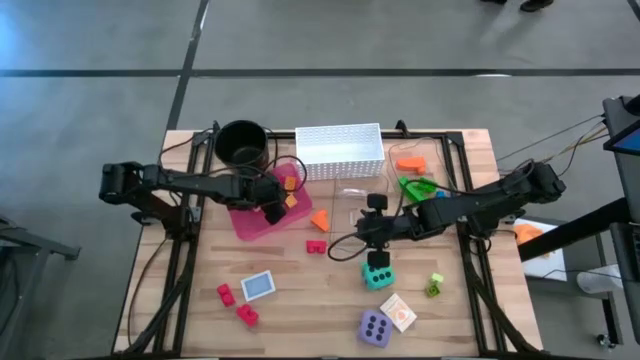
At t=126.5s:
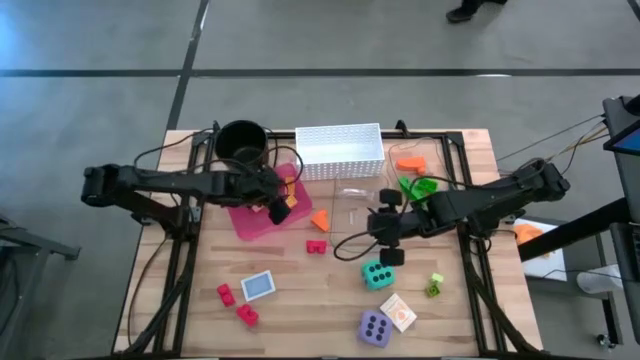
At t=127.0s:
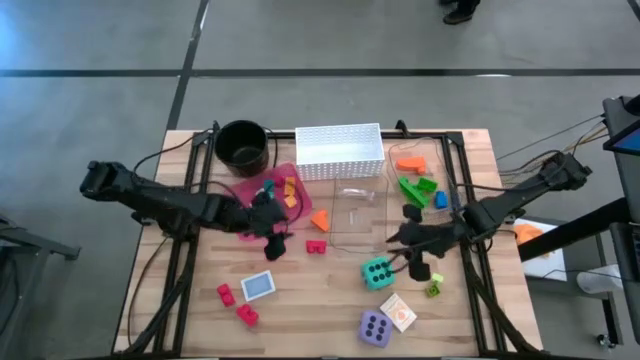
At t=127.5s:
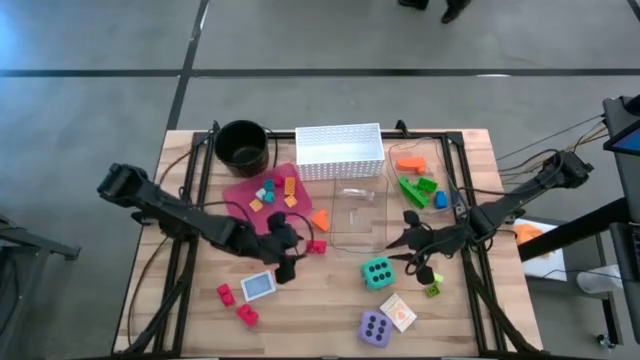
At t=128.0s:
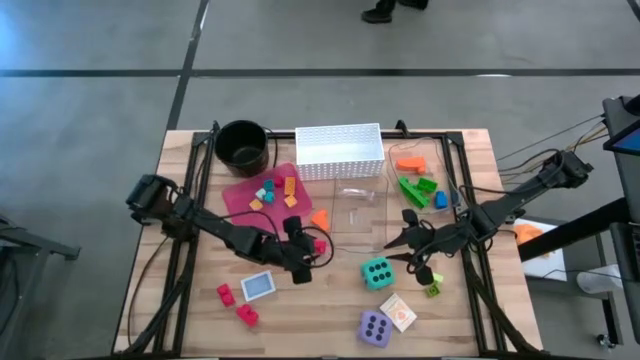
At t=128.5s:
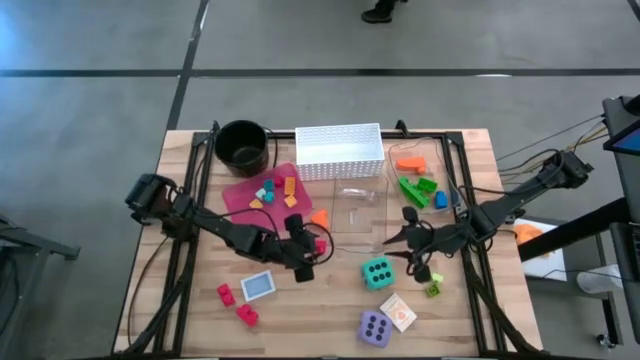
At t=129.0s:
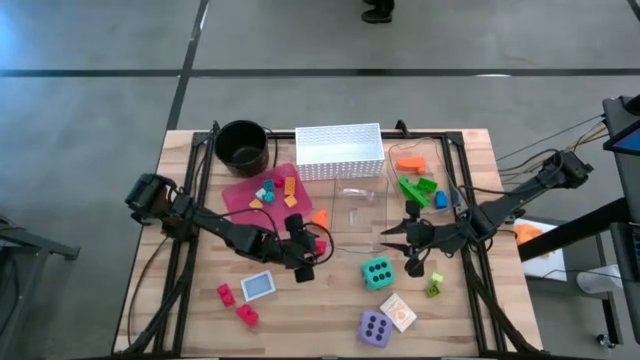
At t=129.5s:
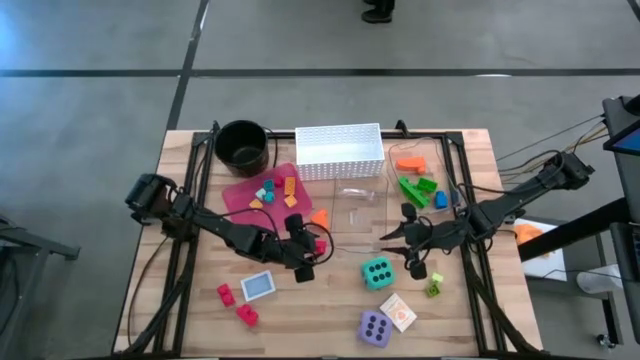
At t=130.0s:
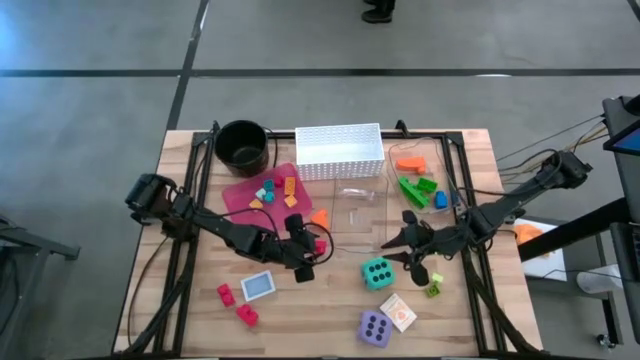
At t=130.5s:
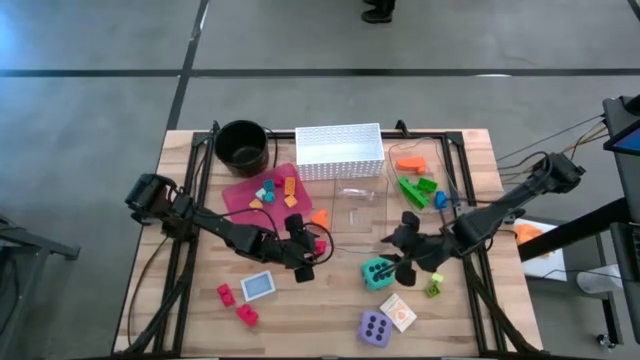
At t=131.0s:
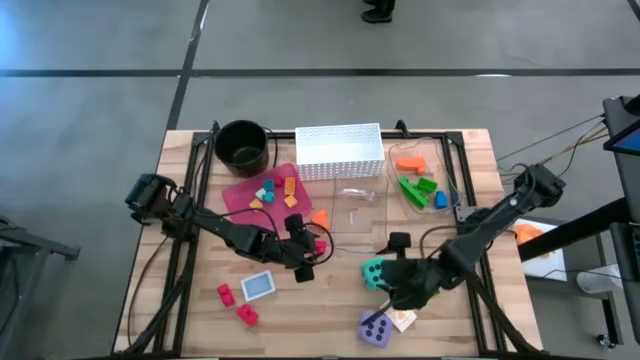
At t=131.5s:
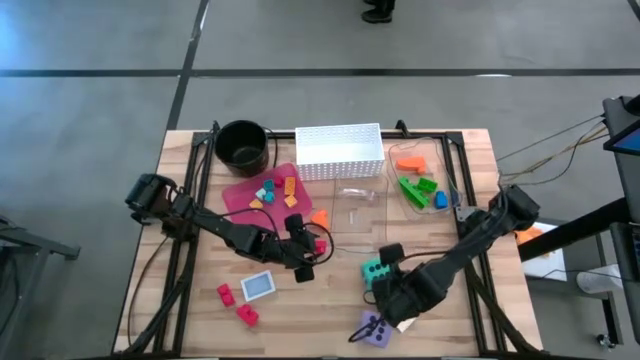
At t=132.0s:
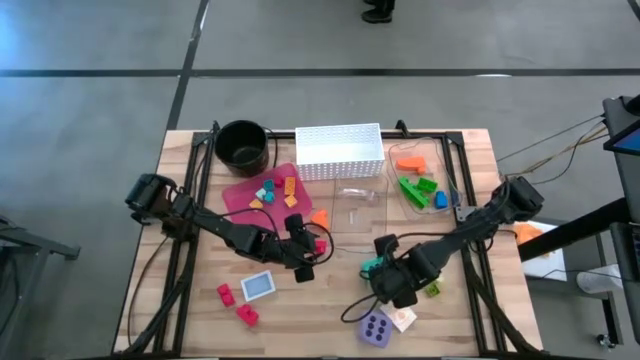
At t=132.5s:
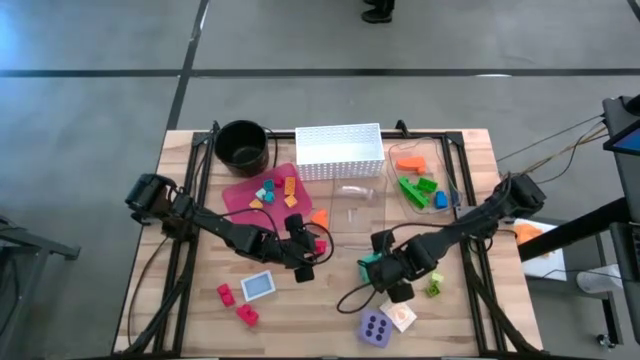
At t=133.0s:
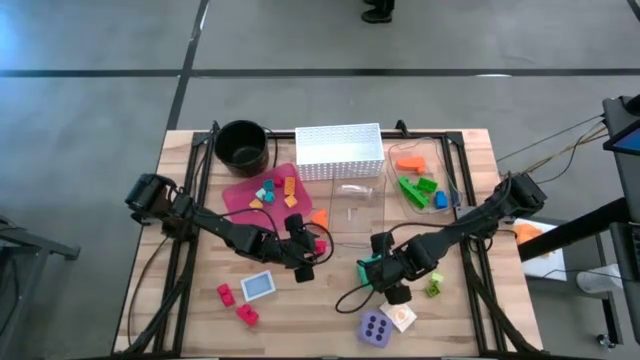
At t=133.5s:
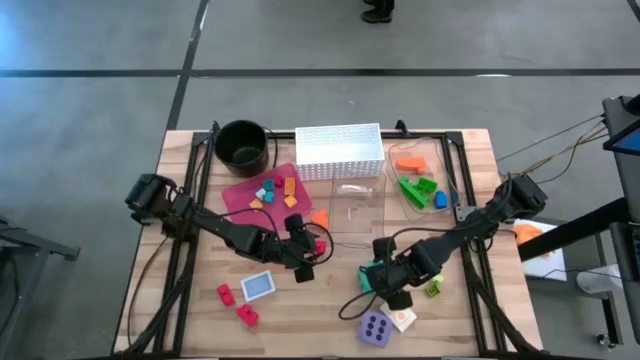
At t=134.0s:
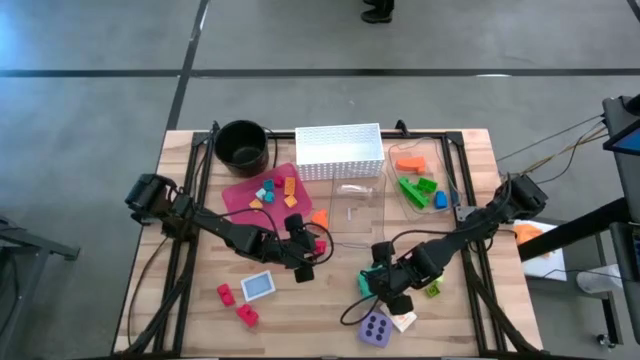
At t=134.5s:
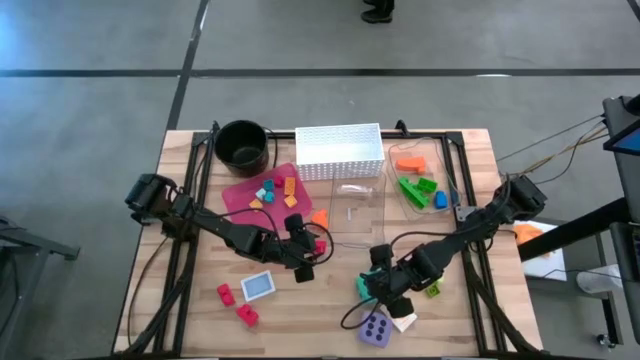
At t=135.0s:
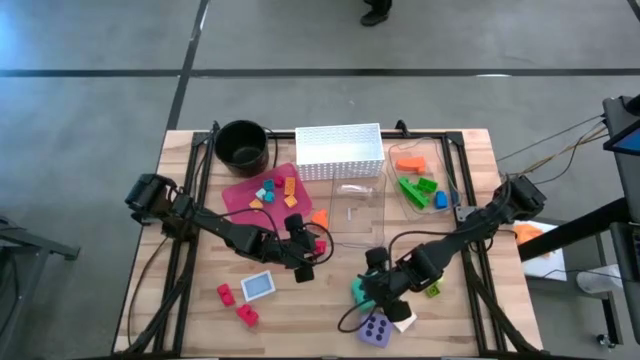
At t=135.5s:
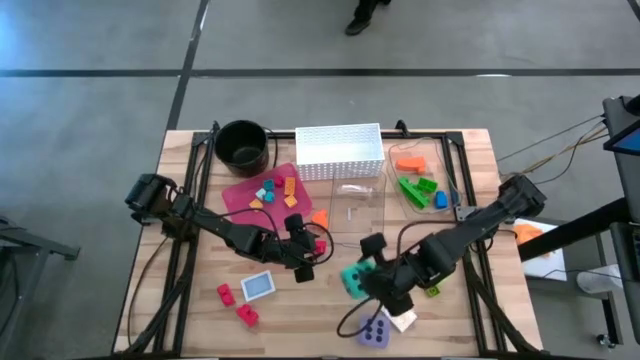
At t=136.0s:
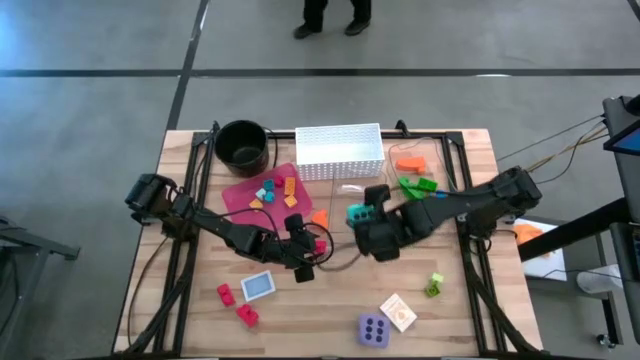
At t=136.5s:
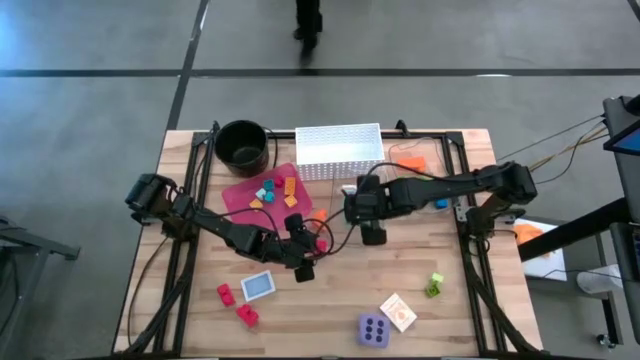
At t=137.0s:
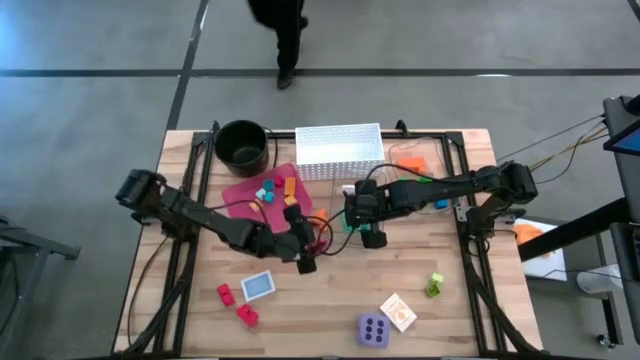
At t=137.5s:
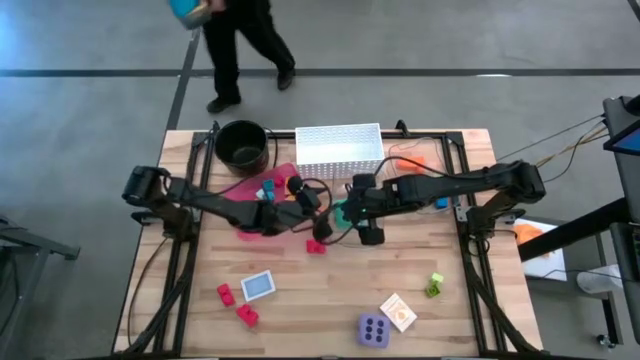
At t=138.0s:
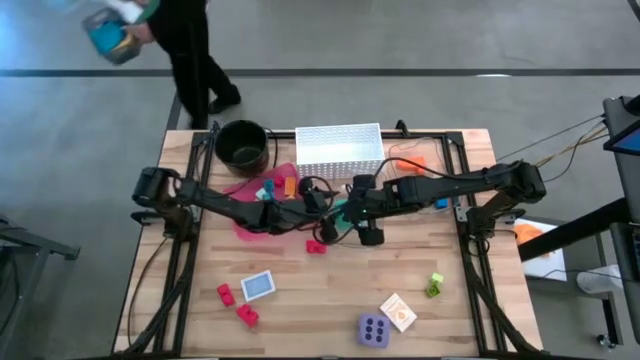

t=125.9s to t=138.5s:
Task: Pick & Place Toys
Put the blue die into the bottom transparent bin

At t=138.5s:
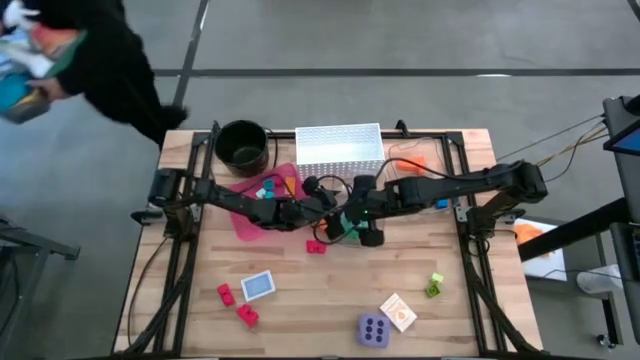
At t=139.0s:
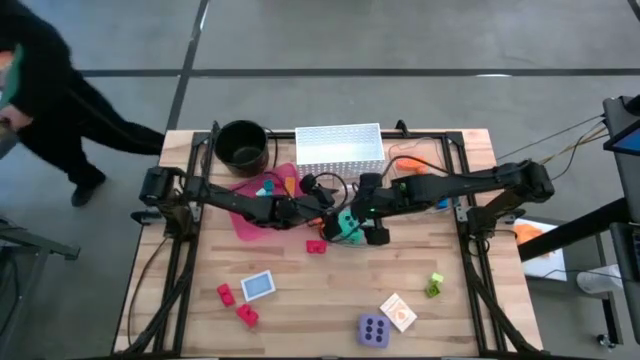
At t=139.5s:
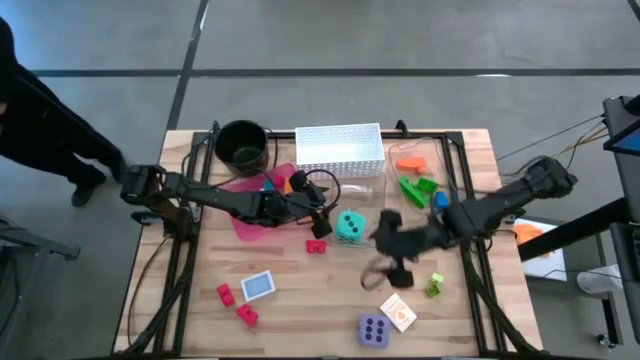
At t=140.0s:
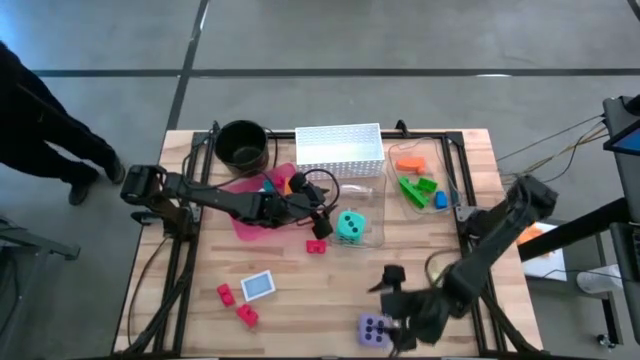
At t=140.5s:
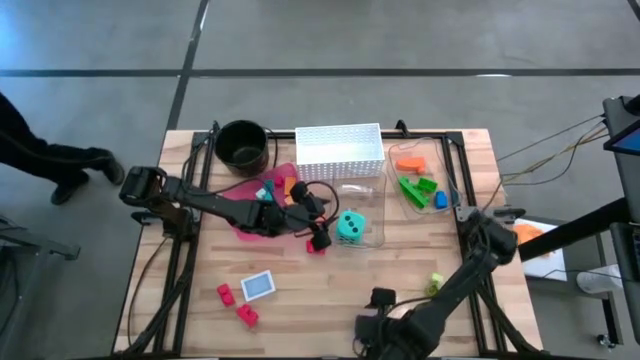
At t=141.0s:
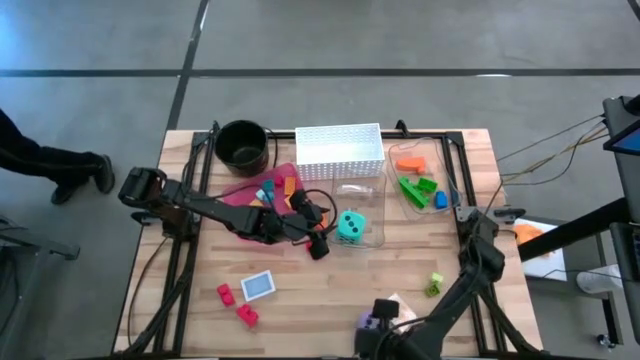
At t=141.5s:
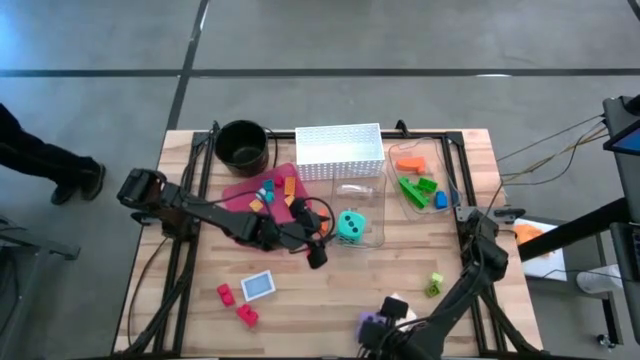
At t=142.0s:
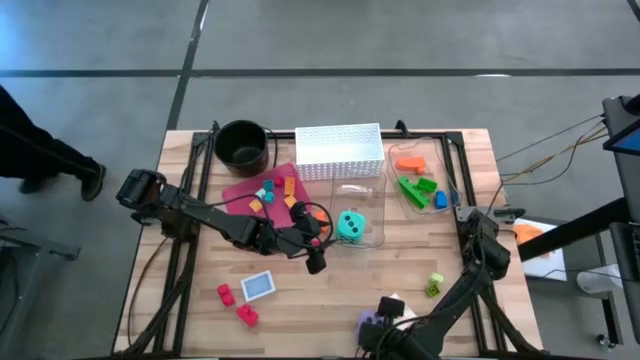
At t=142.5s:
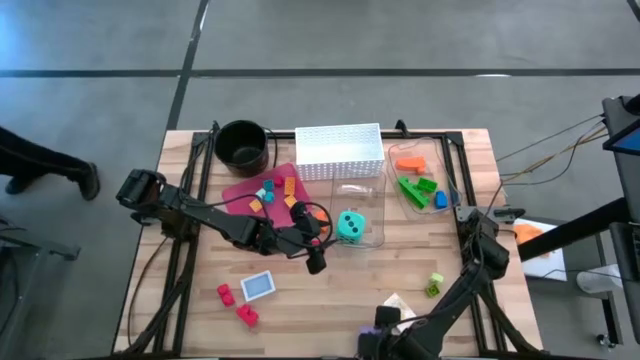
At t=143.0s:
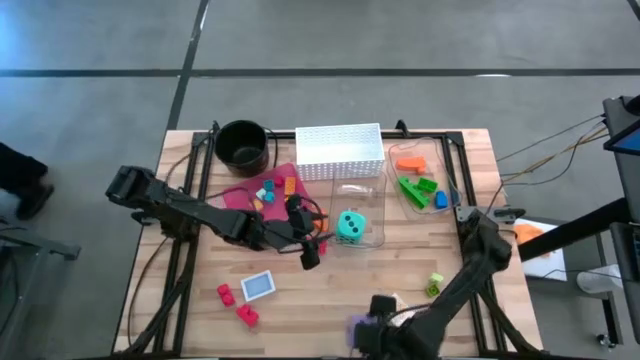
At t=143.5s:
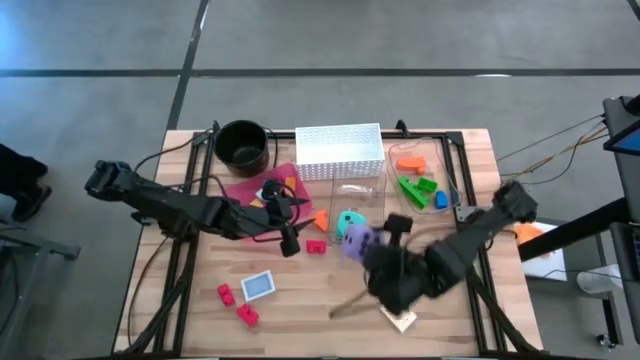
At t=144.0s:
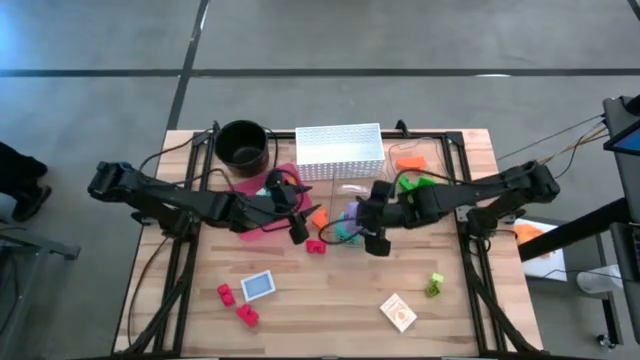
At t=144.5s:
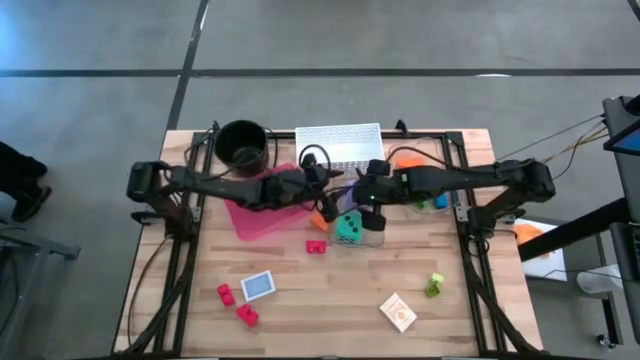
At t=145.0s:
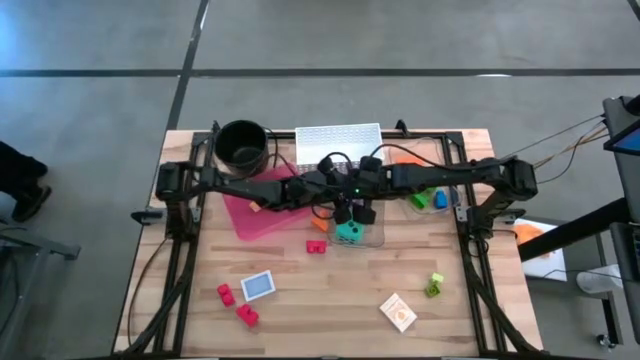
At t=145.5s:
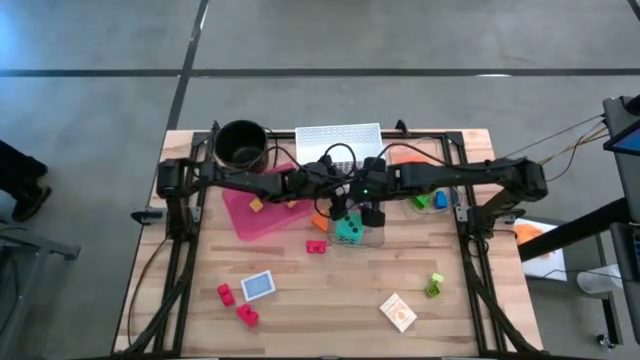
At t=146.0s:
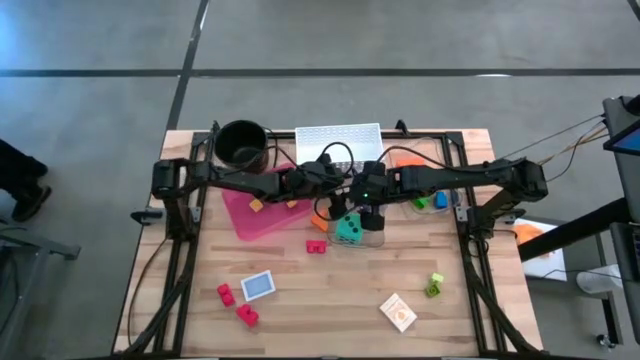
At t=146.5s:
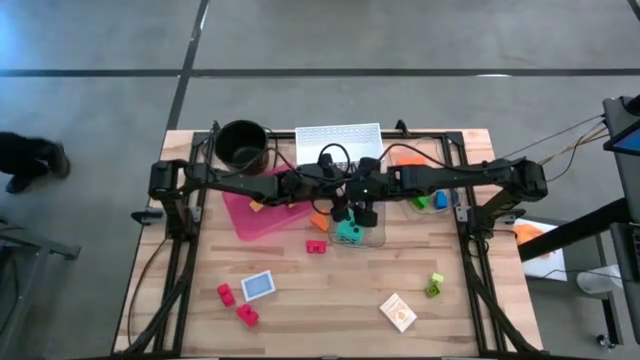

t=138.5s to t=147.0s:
Put the purple die into the bottom transparent bin
